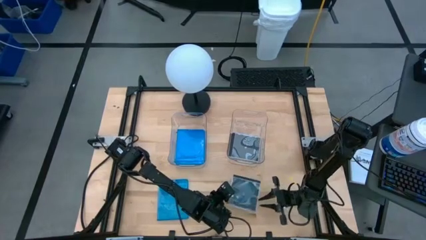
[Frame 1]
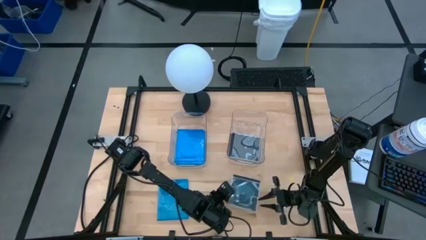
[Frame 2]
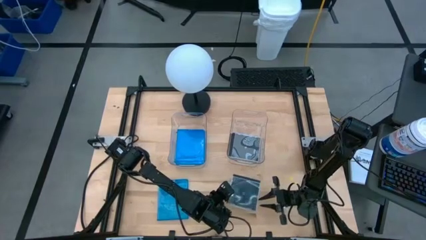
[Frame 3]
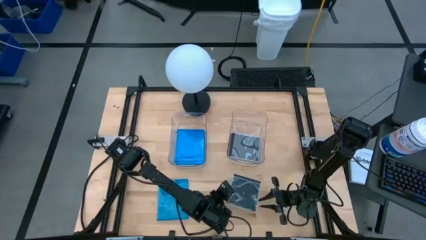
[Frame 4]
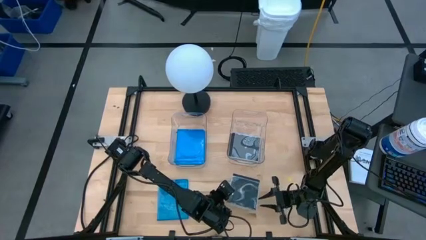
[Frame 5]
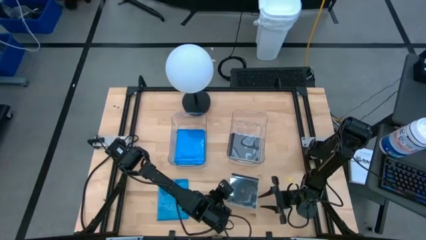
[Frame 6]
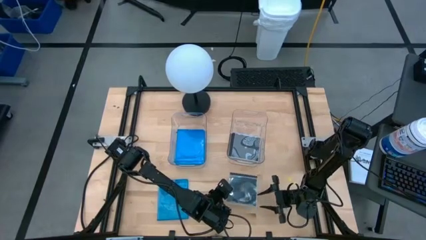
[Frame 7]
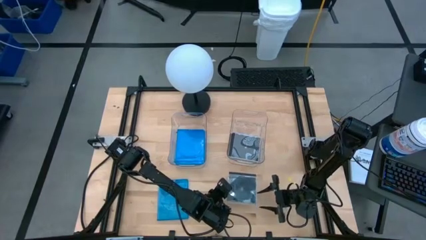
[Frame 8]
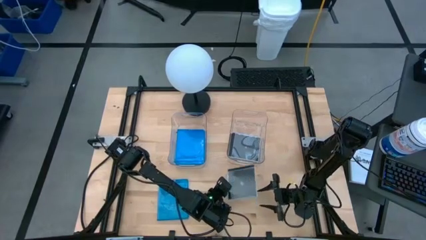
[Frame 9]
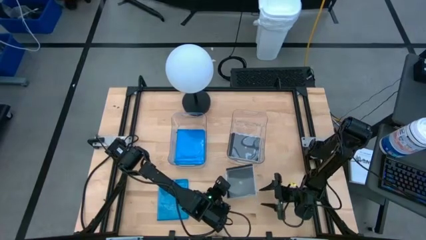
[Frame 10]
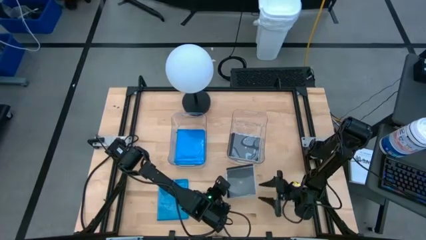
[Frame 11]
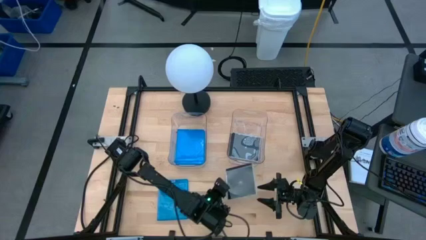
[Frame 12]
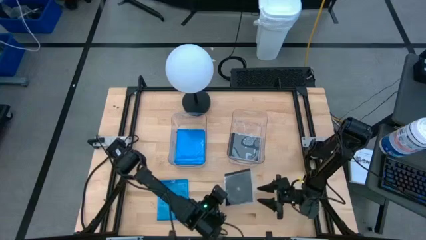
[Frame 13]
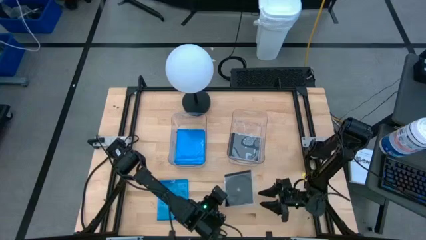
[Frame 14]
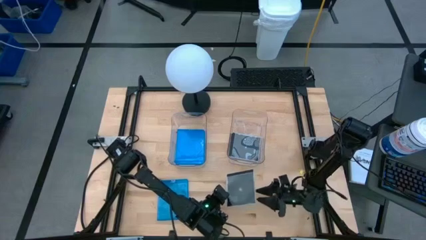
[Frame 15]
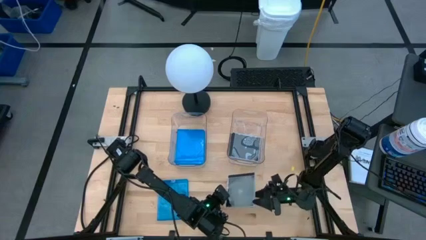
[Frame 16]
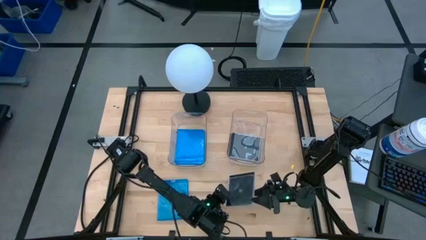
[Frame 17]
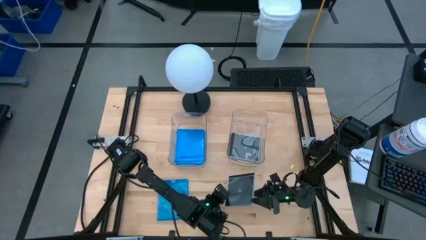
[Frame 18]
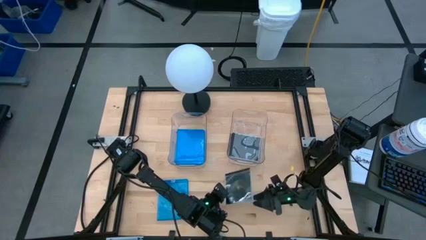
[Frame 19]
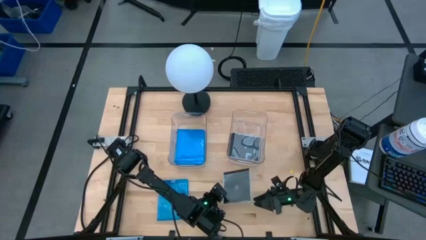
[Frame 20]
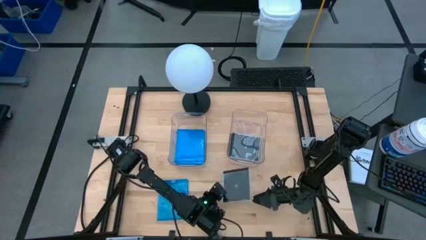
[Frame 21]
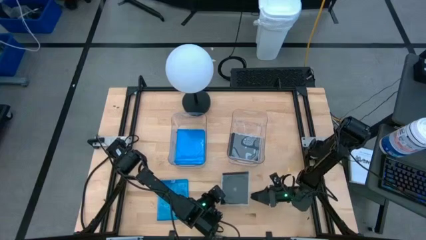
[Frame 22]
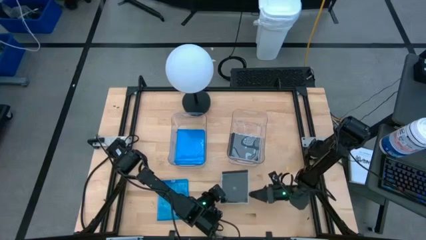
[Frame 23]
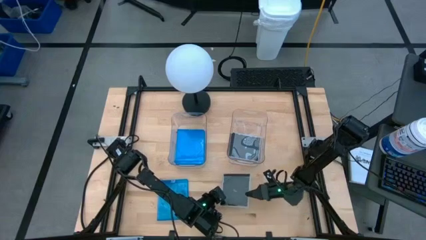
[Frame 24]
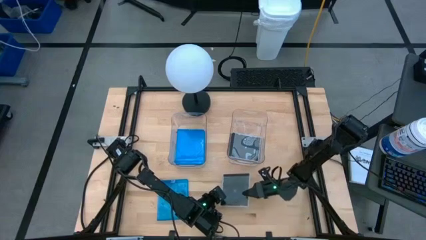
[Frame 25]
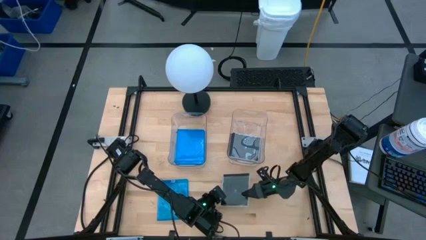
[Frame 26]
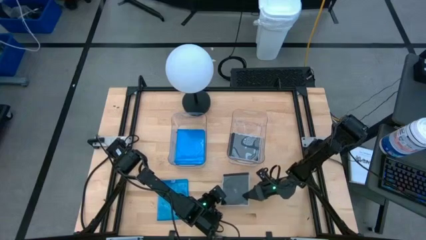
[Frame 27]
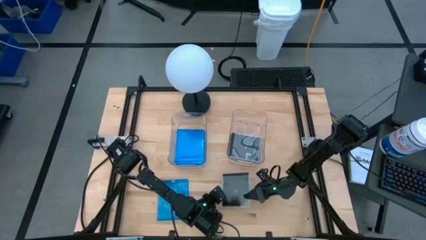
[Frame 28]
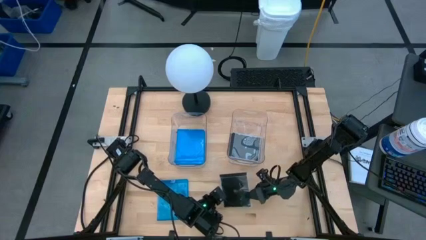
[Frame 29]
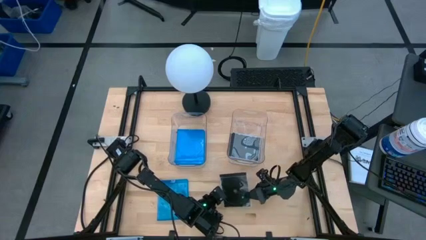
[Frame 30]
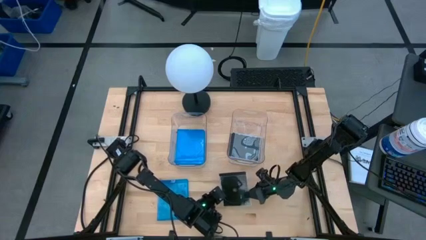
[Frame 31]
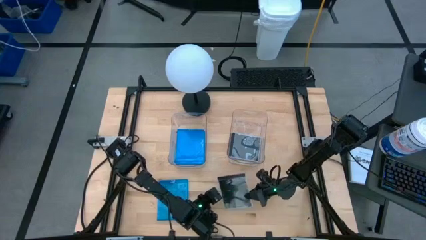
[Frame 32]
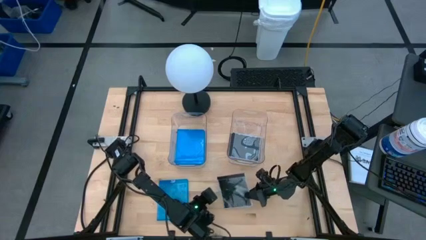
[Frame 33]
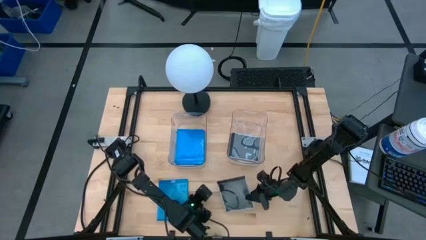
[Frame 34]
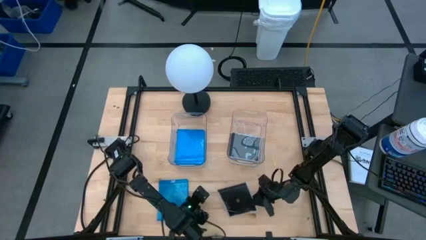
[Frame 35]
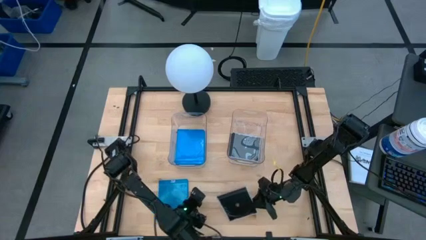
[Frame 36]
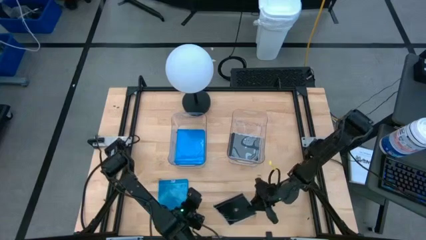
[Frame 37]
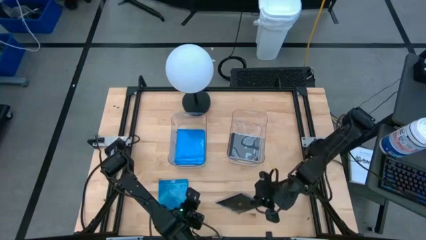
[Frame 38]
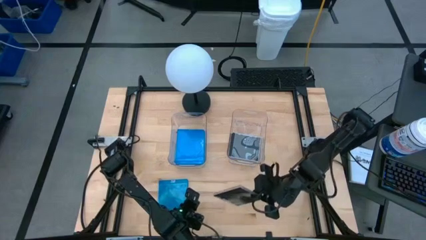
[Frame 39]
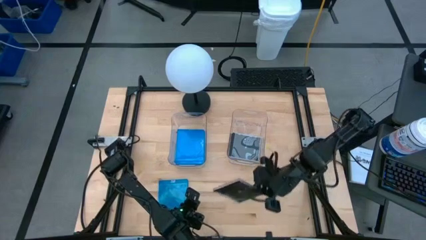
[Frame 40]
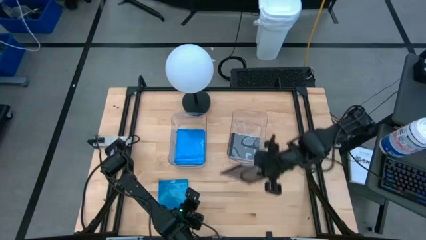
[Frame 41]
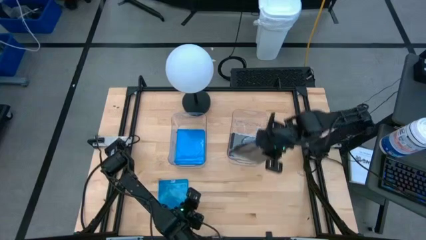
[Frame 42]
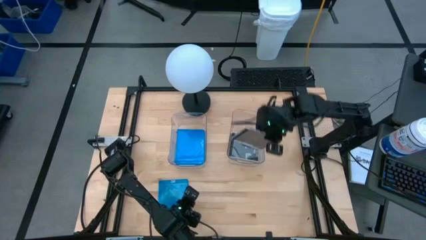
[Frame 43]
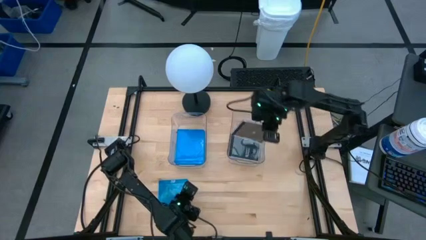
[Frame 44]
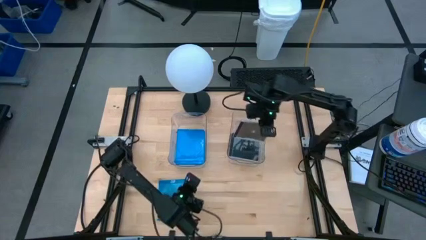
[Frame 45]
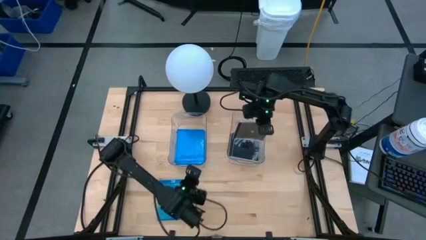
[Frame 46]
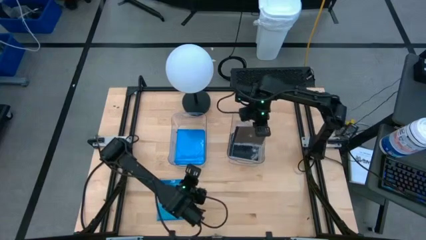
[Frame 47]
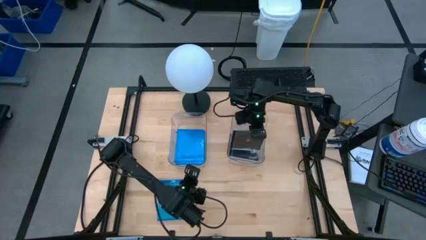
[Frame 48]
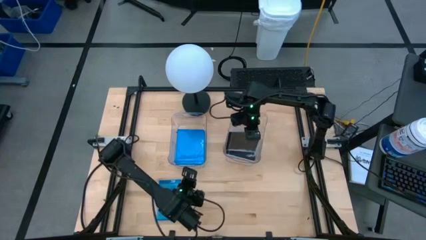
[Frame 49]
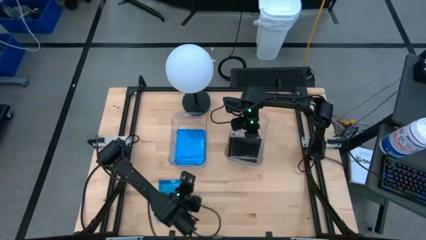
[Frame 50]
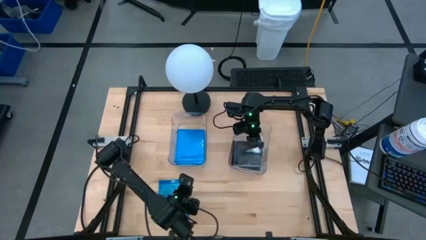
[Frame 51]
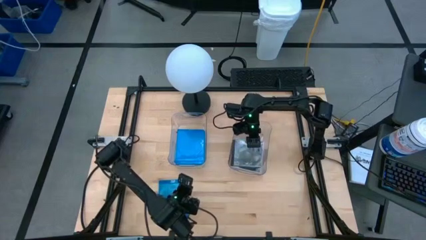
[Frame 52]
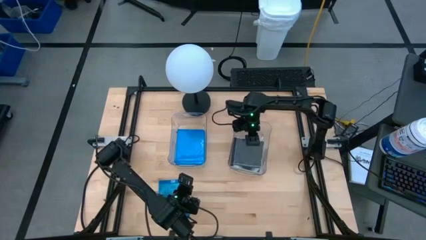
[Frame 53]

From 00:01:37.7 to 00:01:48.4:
Task: Pick & place jewel cases by type
Put the black CD case into the right transparent bin
